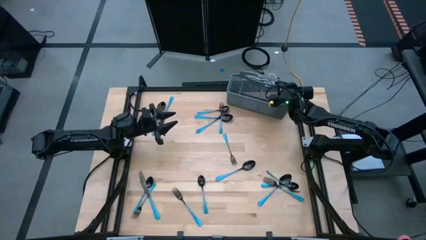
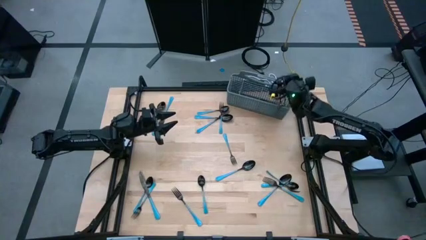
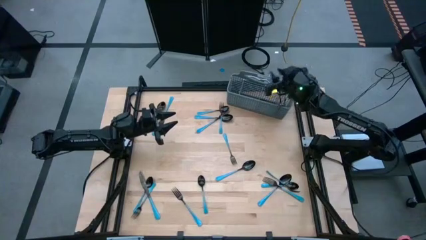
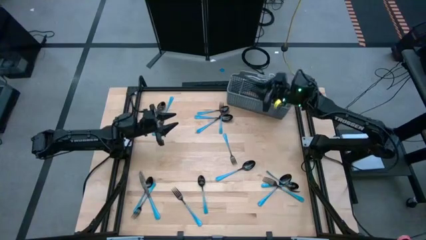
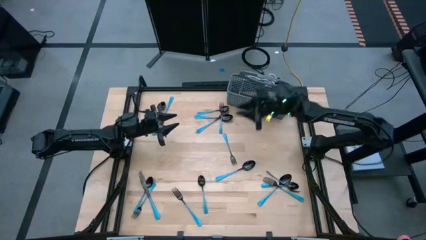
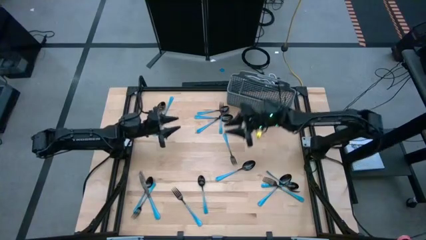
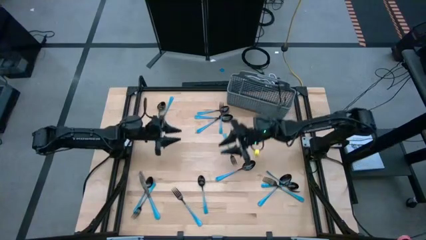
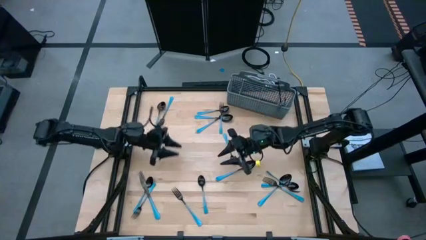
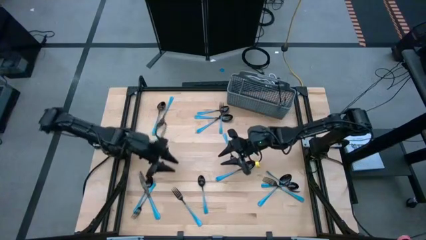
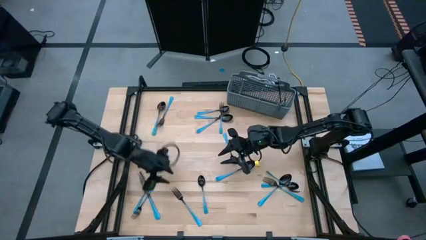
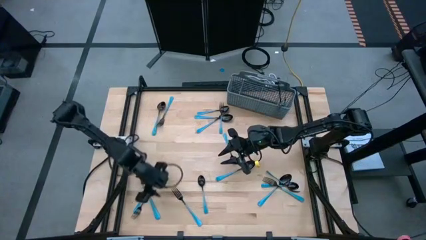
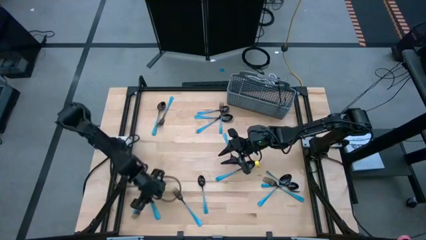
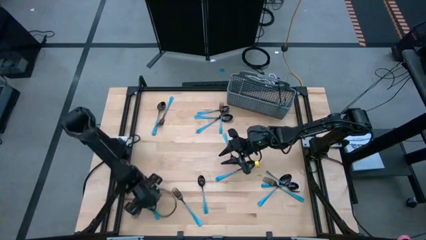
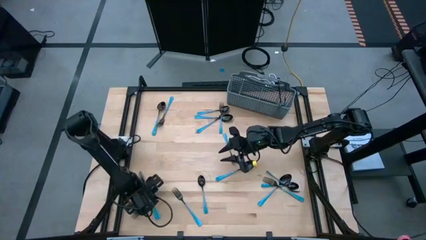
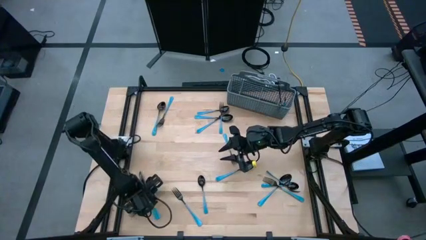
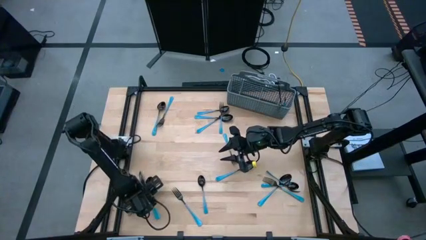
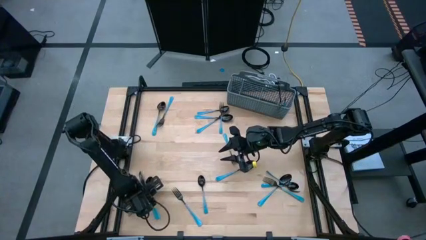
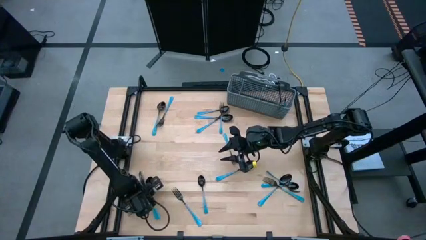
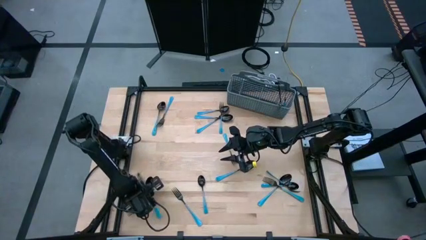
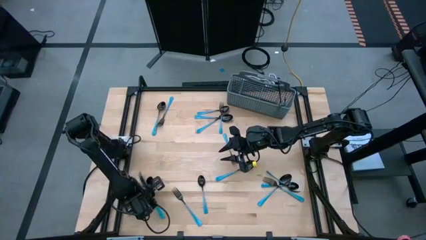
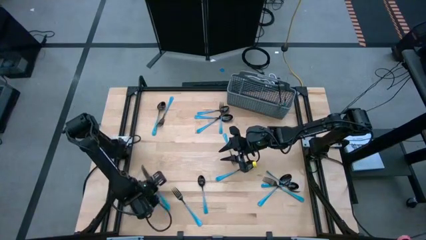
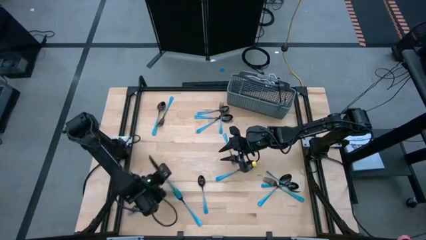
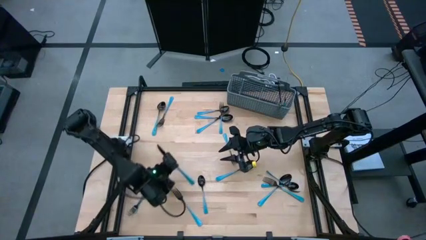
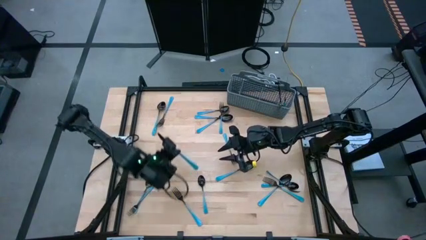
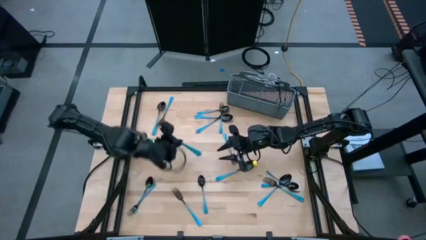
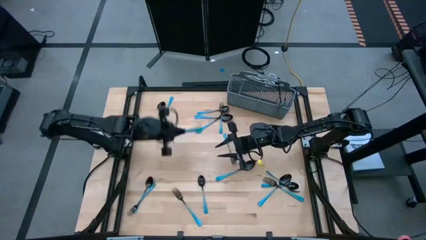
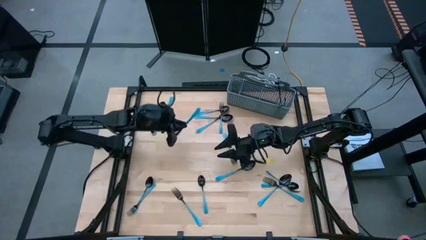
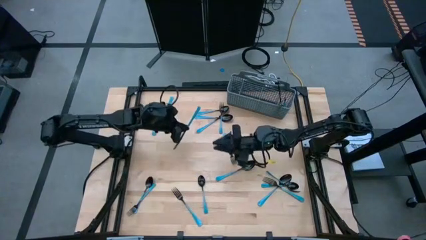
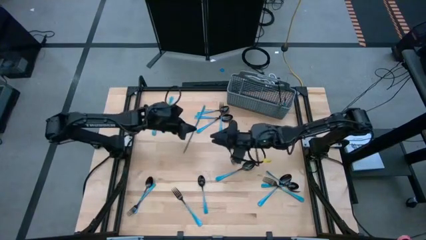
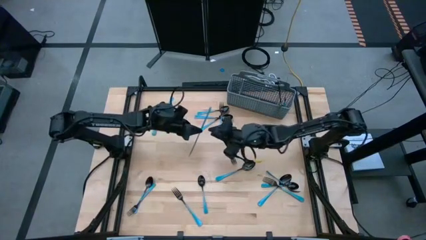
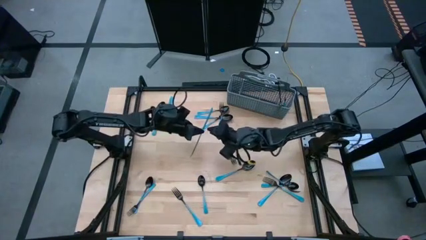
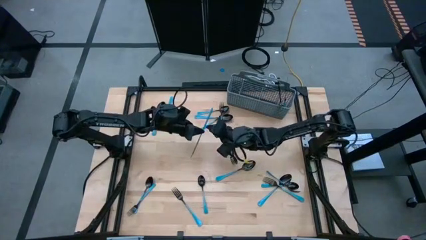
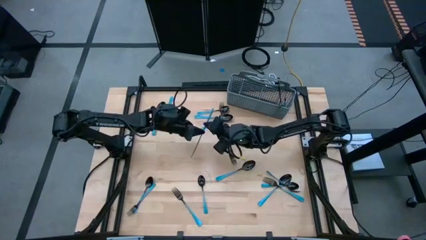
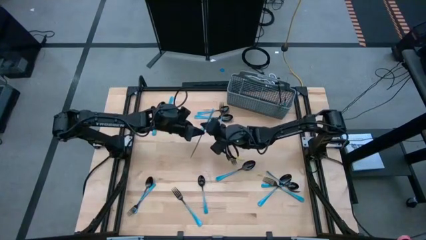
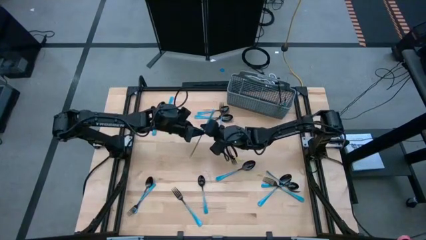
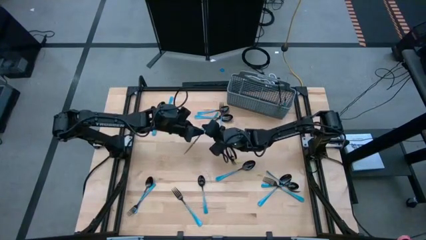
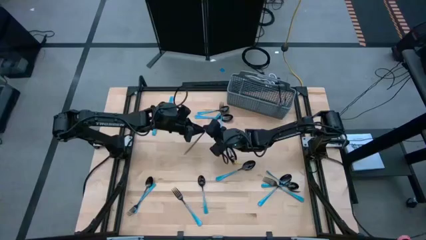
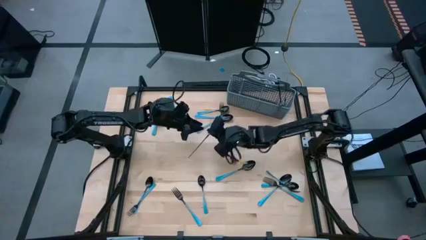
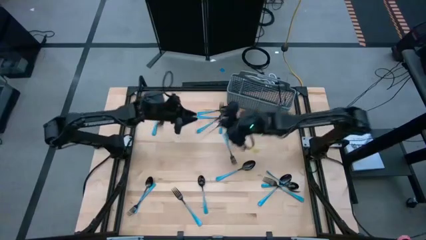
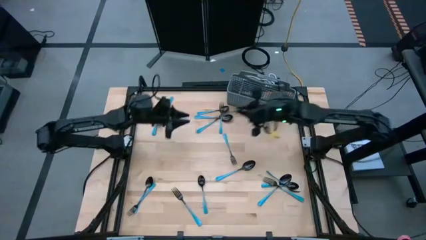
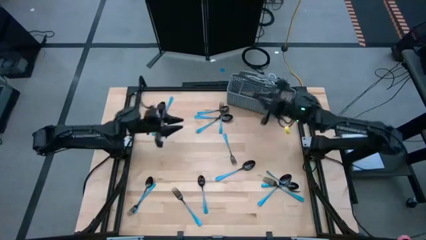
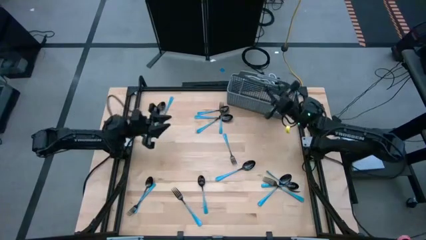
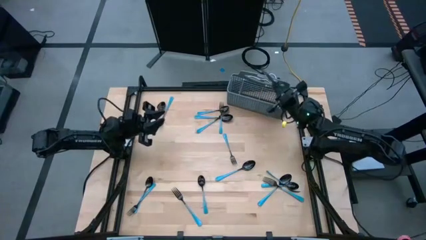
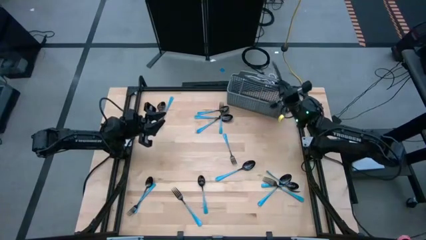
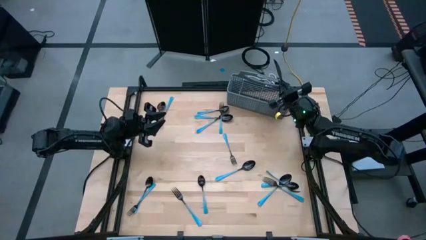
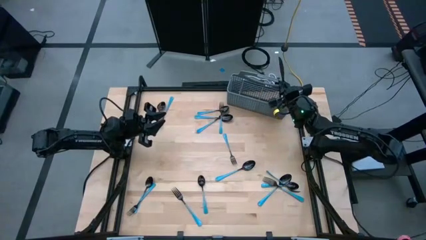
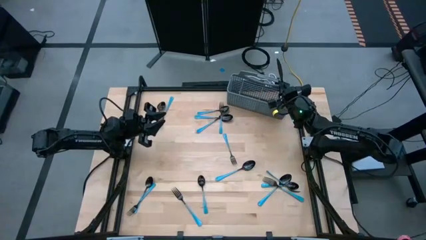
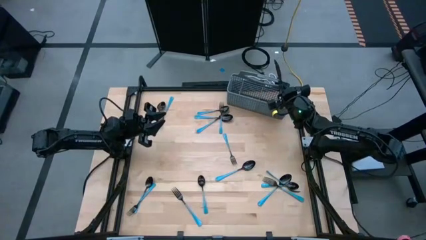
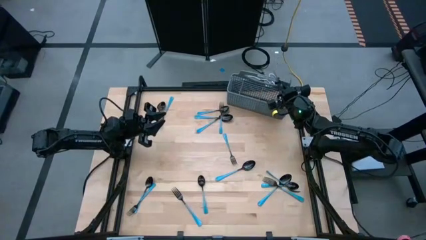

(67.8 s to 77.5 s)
Task: Sort silverware
Put the blue knife into the right of the blue utensil organizer

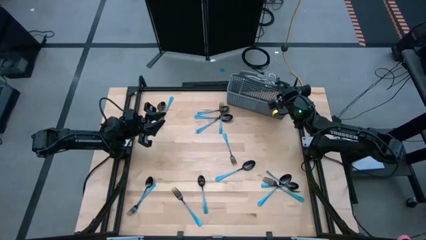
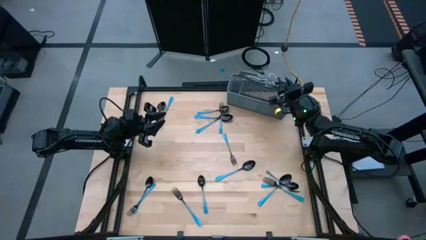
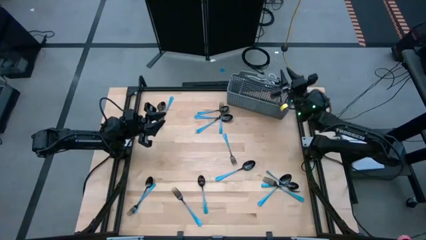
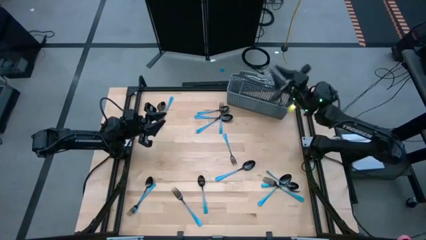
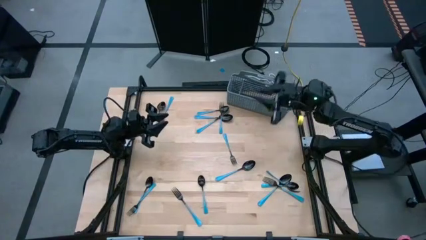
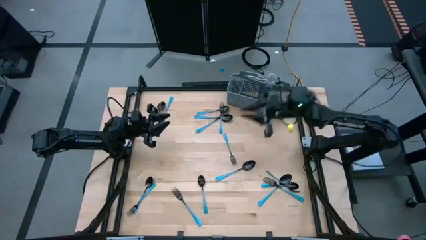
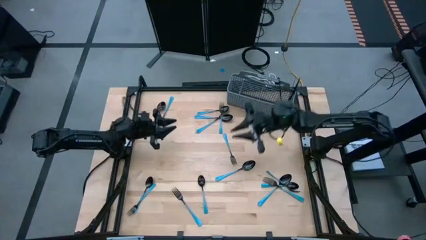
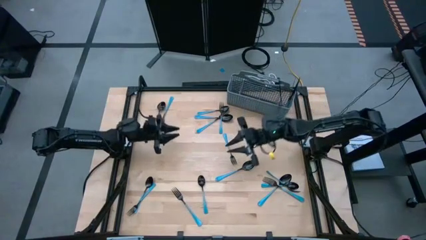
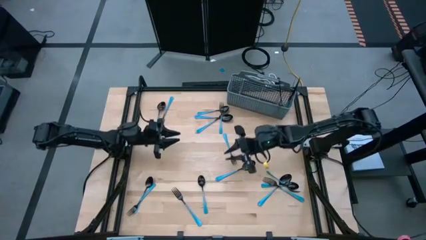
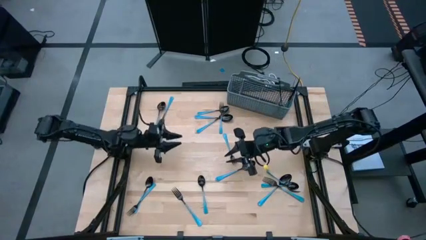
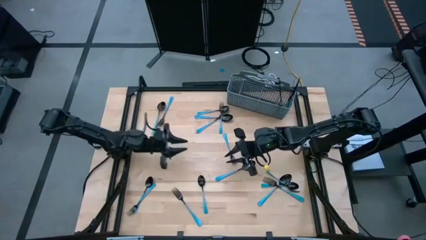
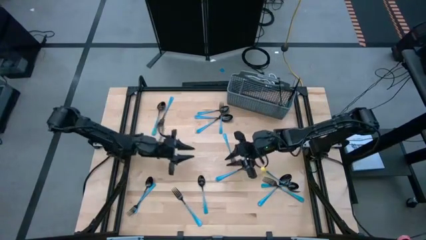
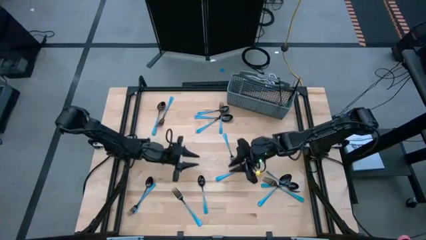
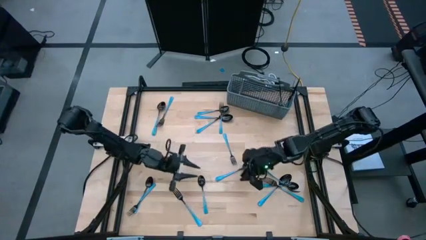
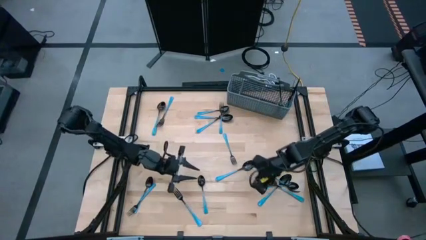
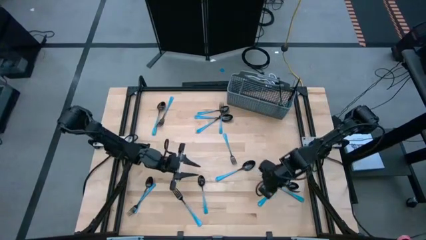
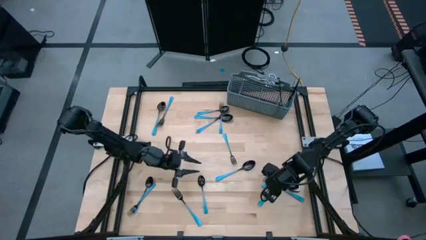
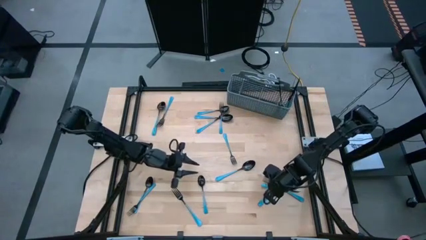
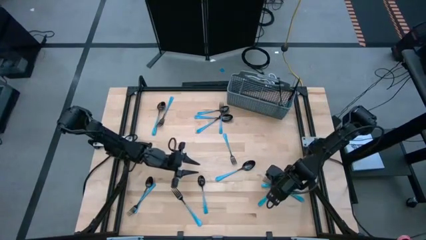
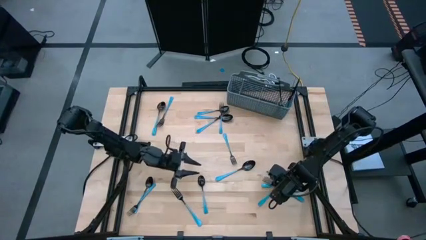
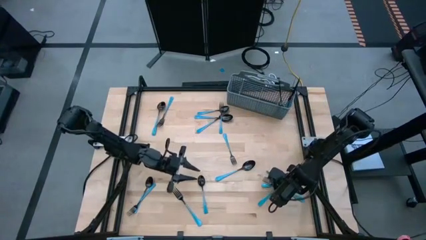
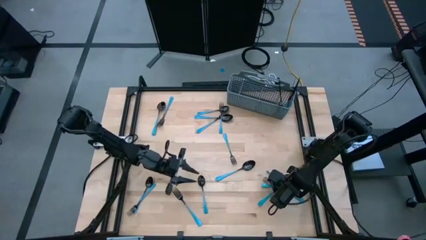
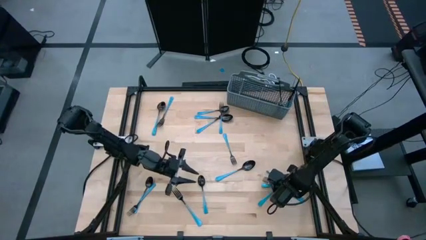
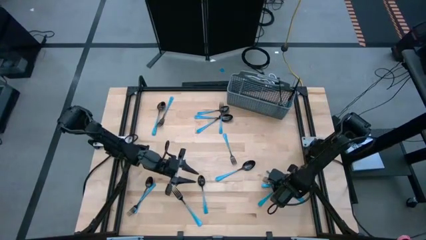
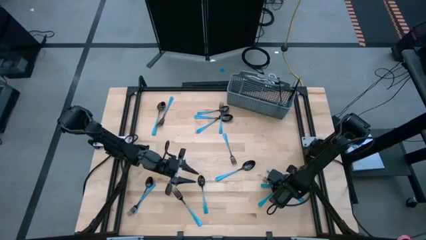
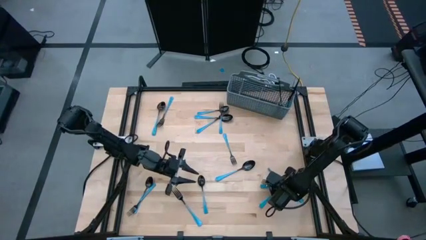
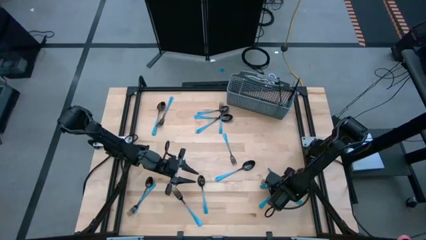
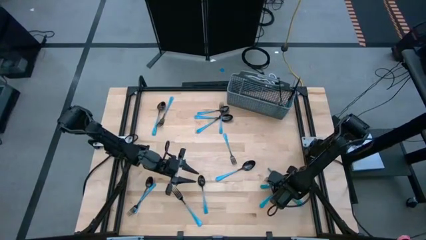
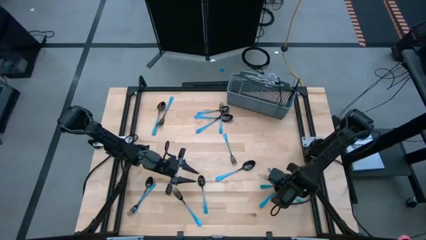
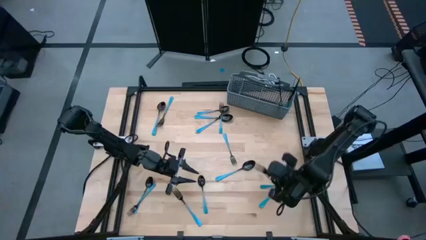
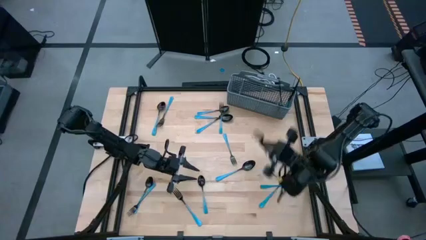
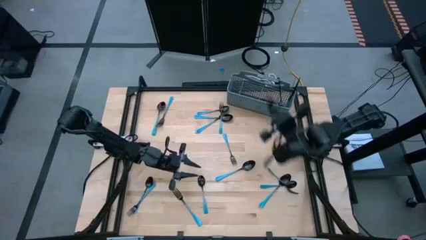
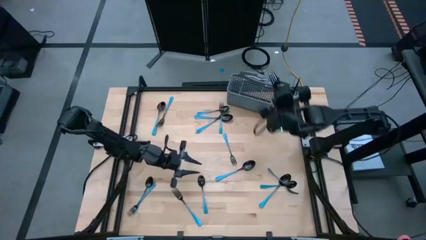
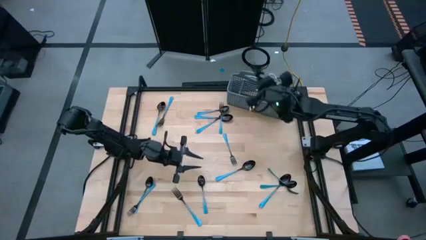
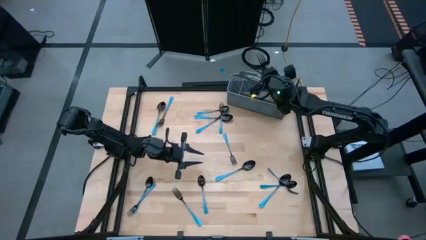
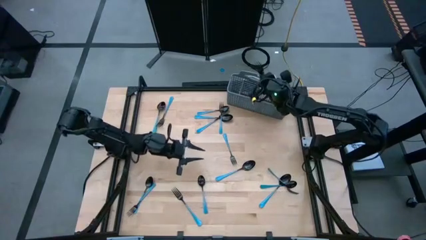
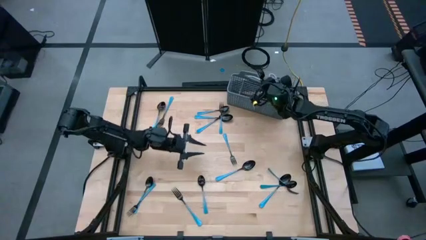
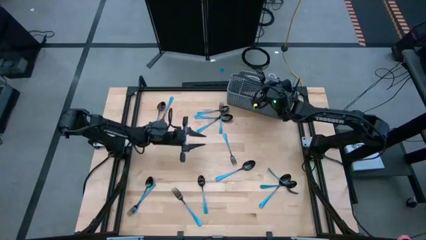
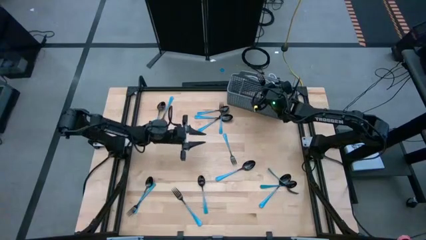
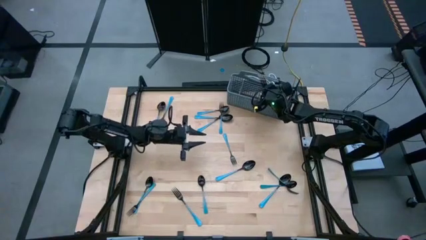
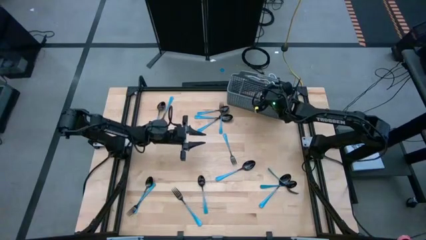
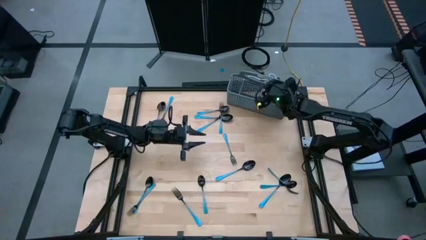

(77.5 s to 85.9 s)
Put the blue fork into the middle of the blue utensil organizer
